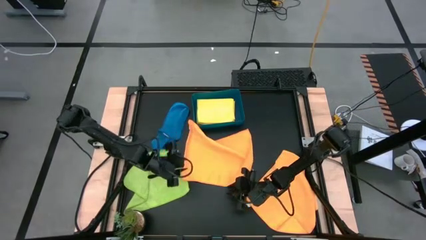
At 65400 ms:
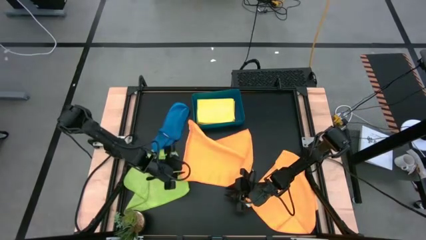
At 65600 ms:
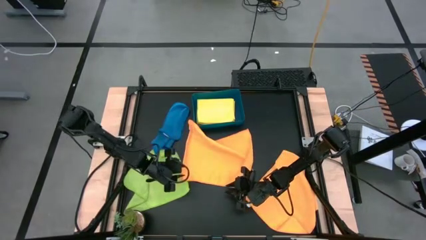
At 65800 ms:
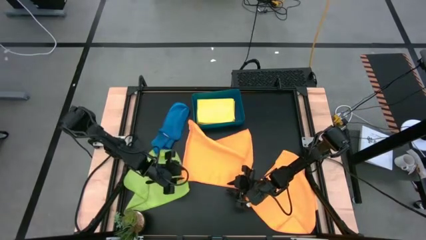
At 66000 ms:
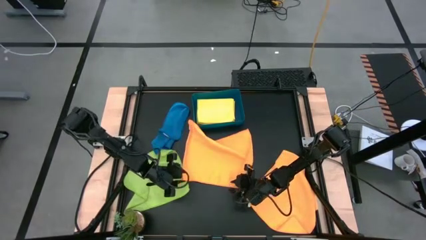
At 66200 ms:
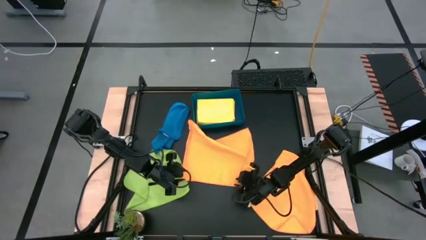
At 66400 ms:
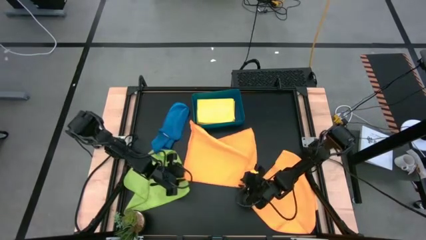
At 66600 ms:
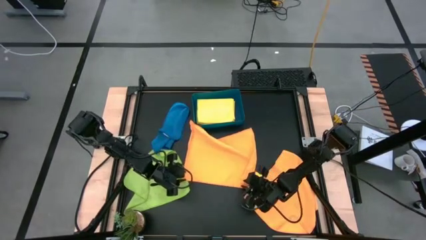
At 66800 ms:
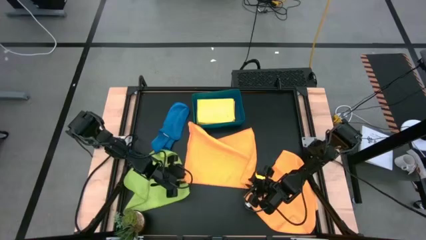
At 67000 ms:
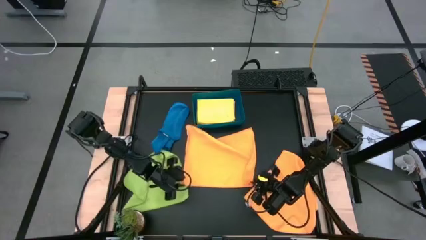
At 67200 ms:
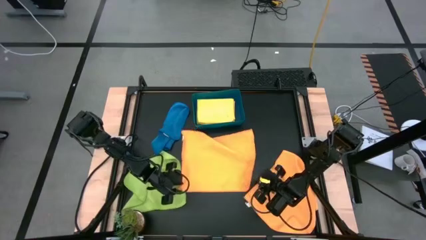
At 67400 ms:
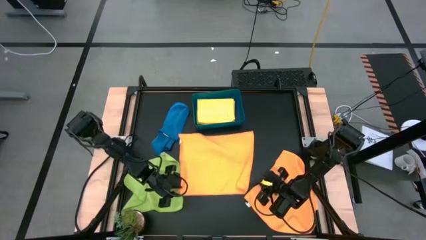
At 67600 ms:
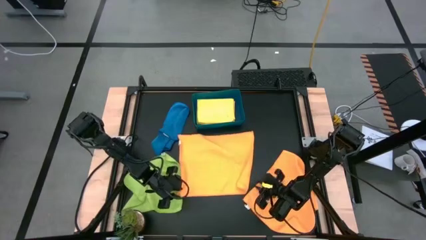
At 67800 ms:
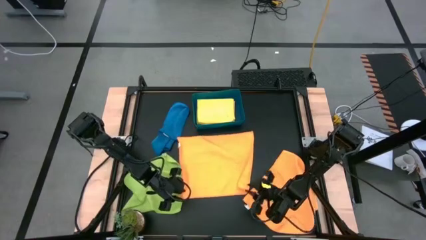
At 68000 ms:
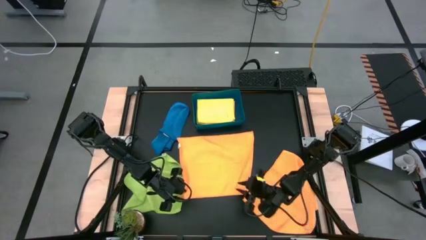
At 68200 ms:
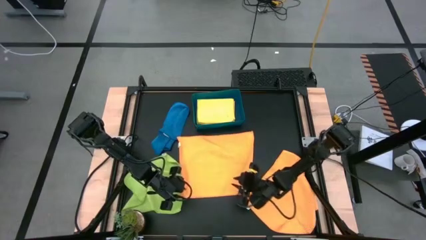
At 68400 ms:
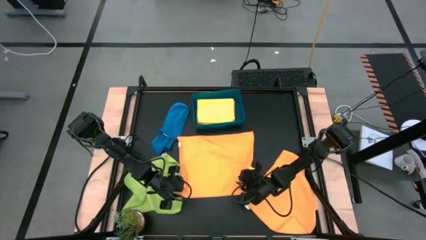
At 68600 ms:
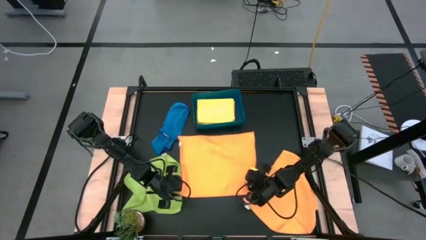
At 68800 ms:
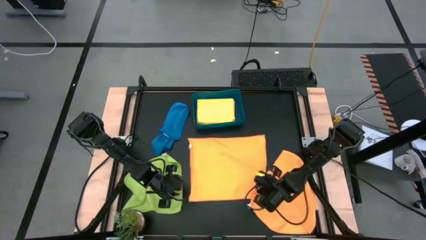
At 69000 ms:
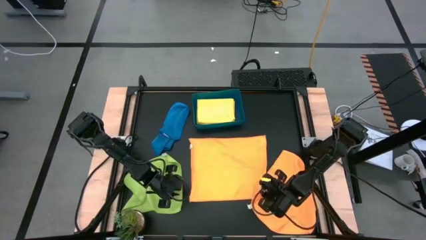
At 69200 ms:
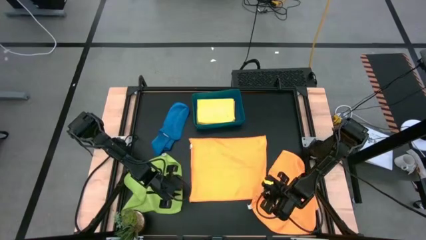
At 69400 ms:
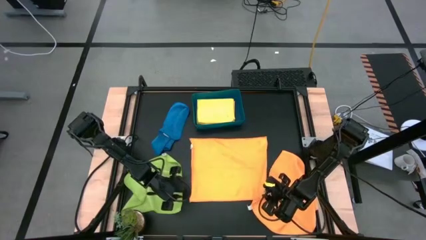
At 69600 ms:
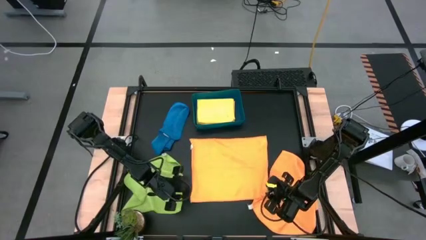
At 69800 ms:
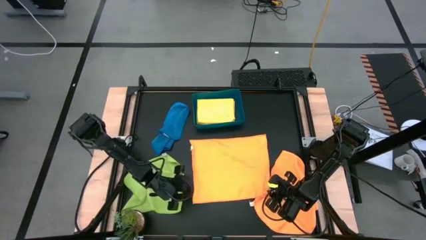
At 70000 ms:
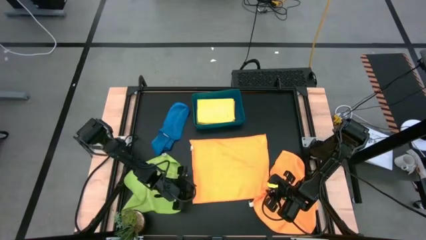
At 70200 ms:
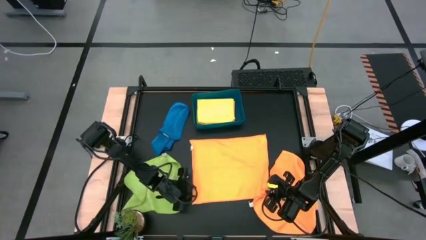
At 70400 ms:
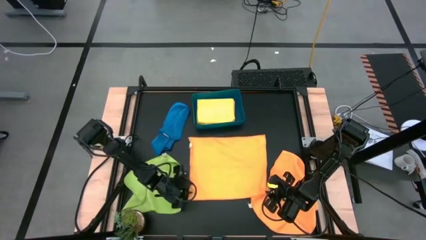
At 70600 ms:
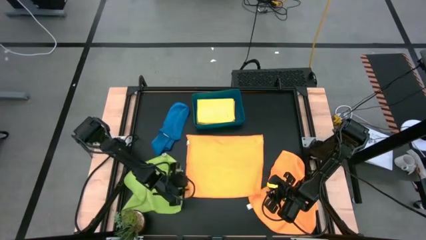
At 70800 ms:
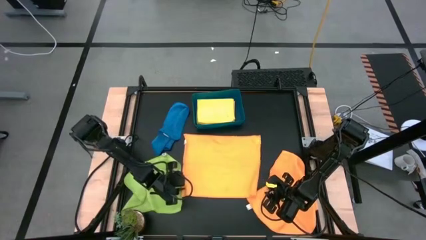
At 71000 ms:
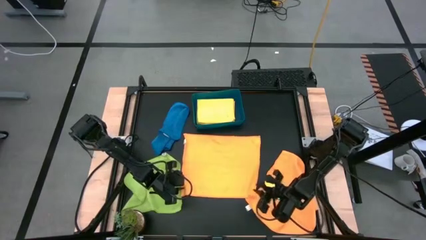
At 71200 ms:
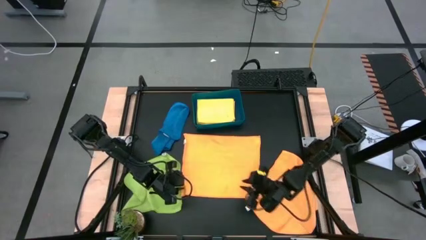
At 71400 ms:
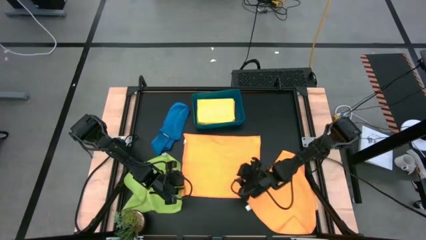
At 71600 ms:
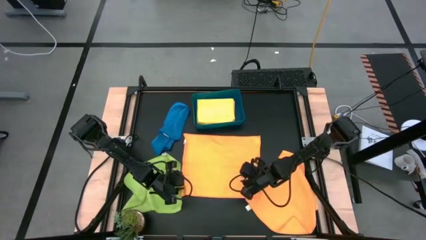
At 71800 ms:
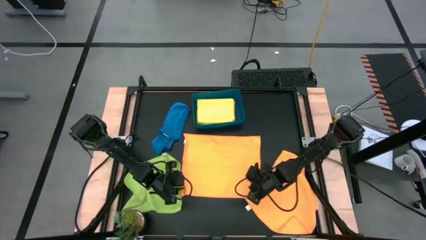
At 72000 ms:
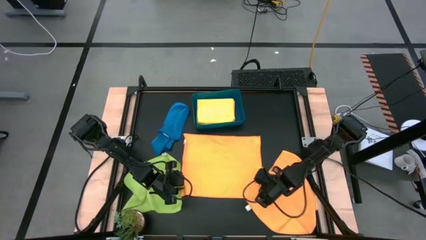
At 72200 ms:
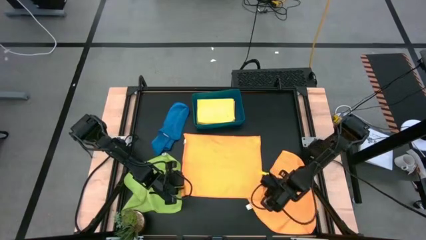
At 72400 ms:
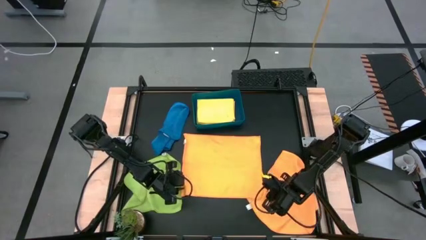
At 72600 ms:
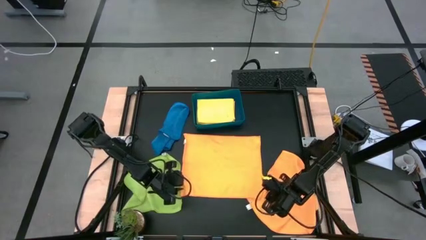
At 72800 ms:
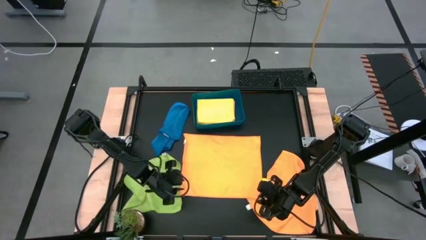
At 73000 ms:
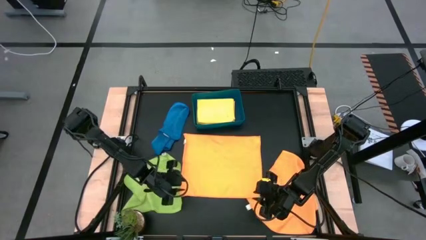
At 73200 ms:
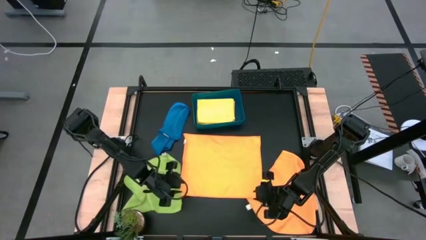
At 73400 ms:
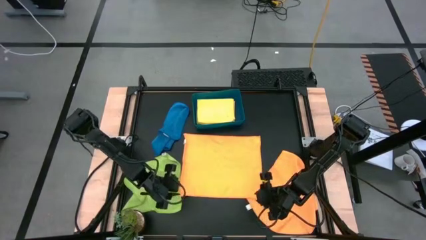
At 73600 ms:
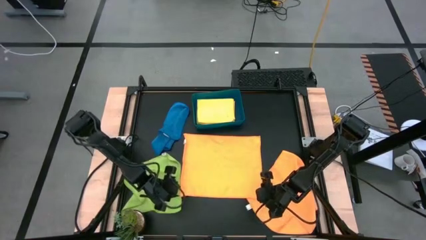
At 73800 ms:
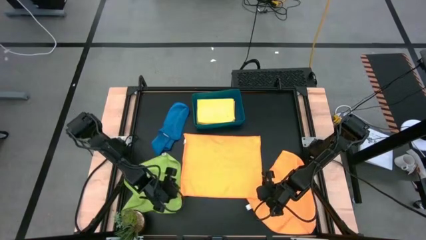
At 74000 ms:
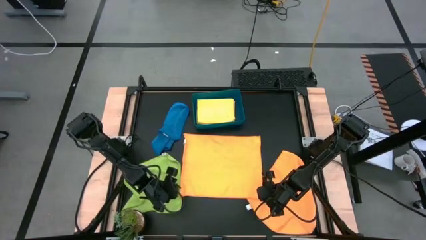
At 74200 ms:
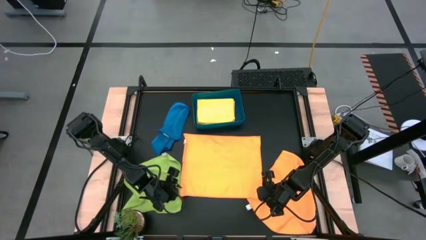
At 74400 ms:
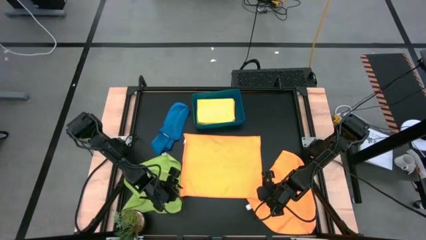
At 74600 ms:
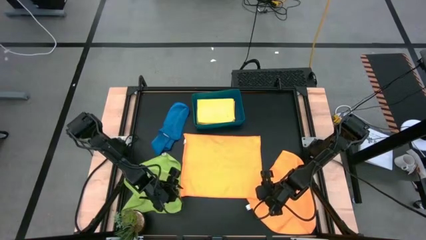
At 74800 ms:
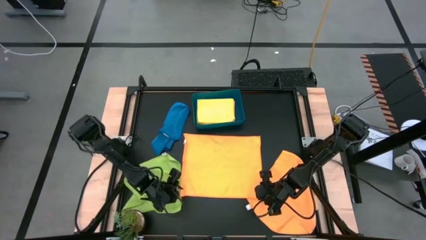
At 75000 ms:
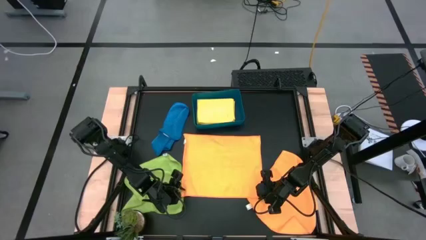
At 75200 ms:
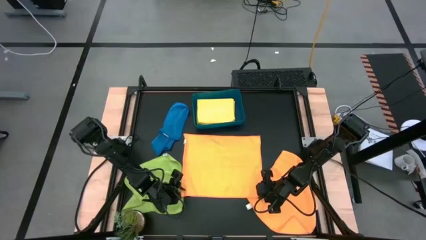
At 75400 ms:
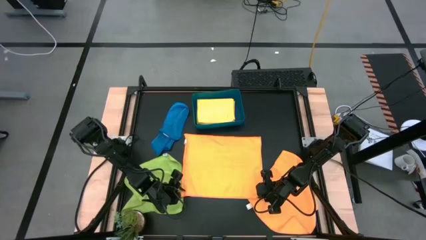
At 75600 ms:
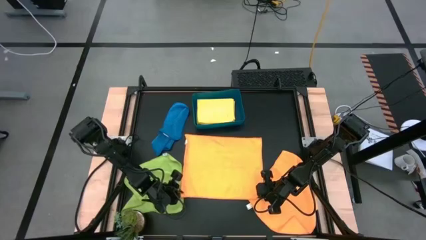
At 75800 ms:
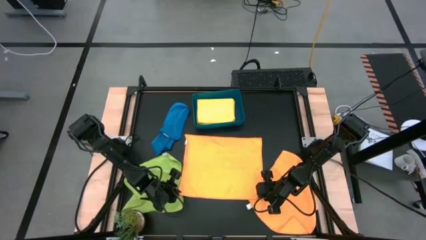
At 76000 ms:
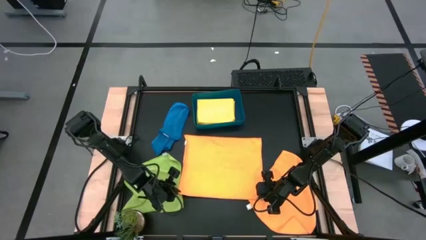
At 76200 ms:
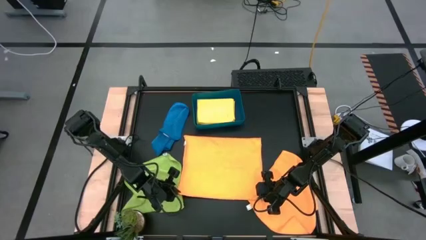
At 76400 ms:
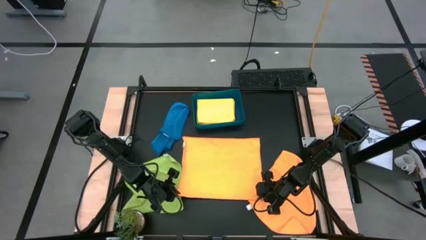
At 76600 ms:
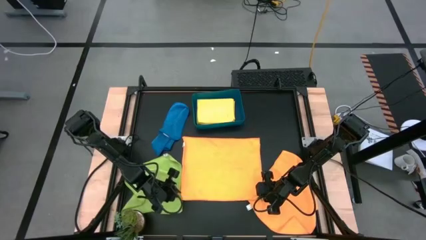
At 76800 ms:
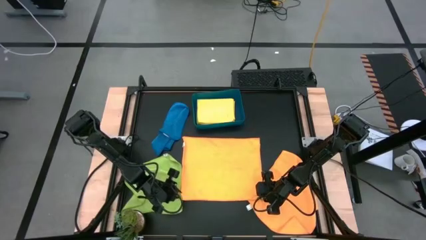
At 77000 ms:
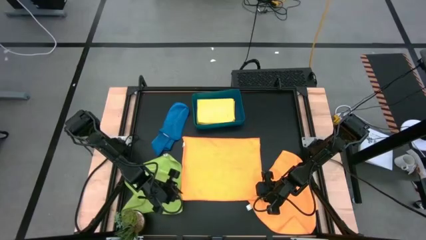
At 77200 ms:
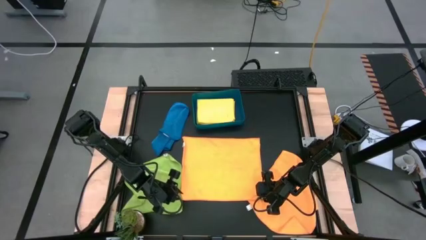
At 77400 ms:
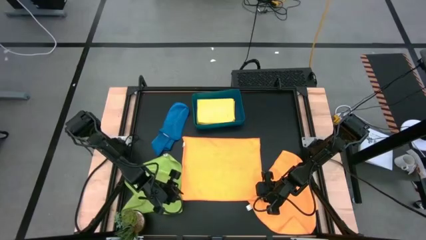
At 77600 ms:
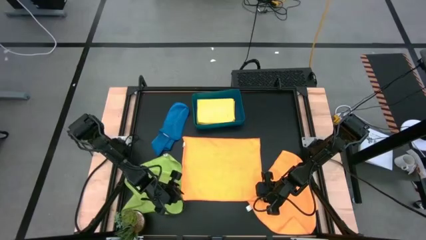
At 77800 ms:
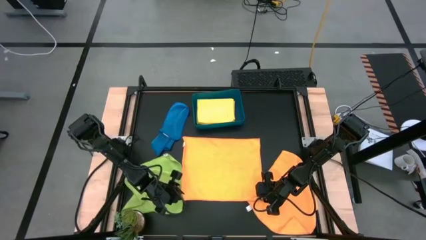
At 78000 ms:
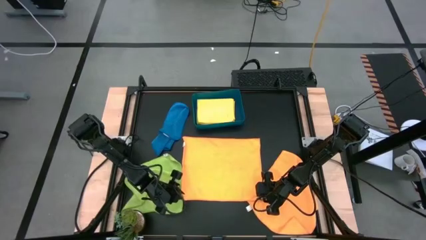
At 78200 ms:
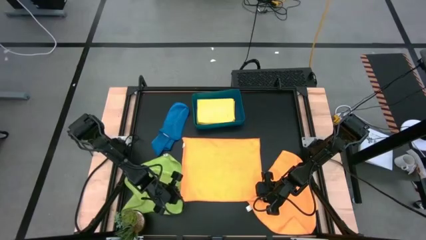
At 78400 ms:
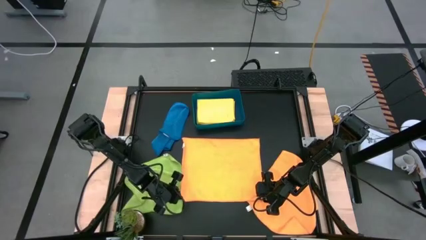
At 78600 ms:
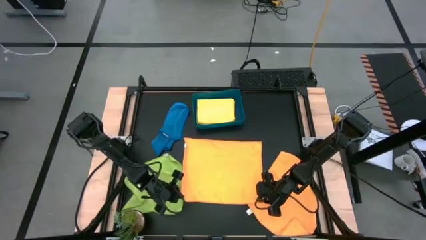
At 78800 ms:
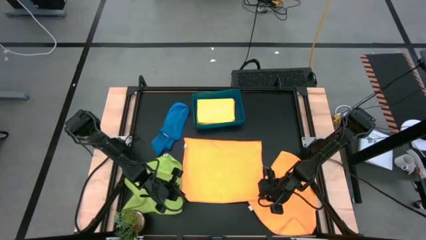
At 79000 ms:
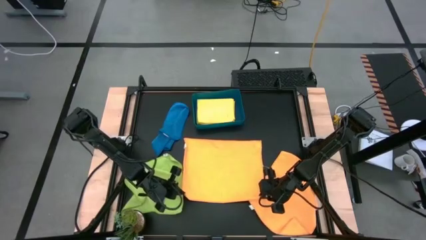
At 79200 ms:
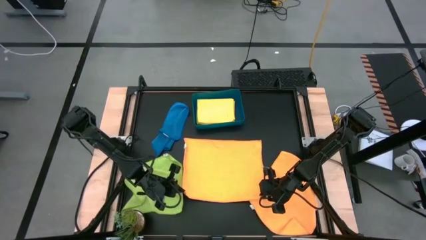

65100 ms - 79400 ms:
Task: Fold microfiber towels
Fold the top orange microfiber cloth
